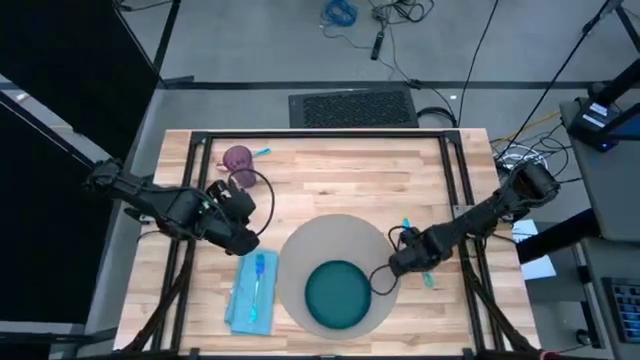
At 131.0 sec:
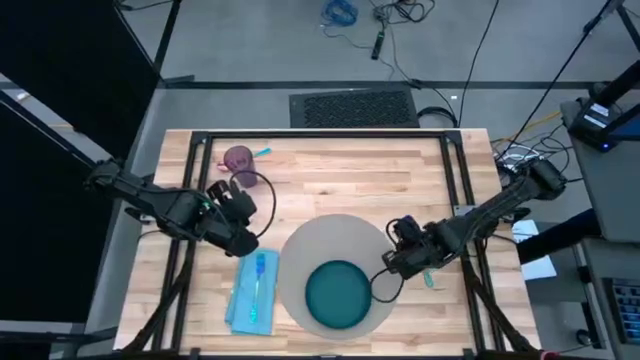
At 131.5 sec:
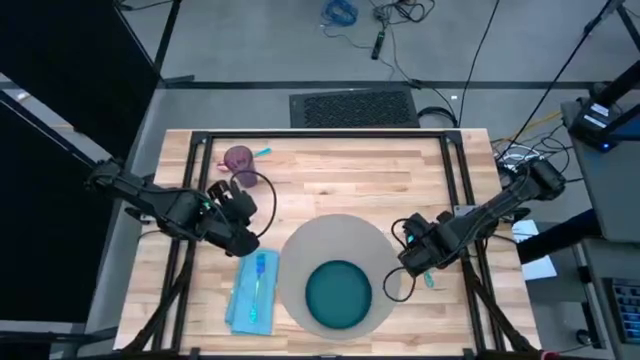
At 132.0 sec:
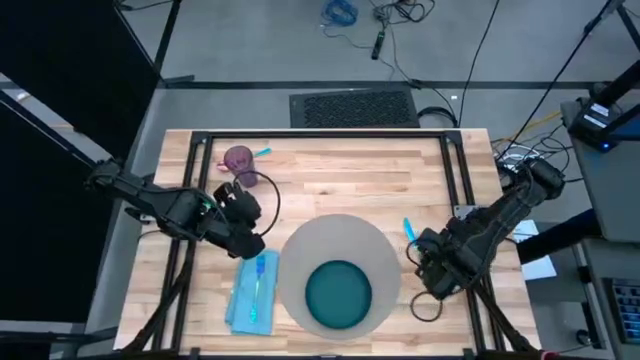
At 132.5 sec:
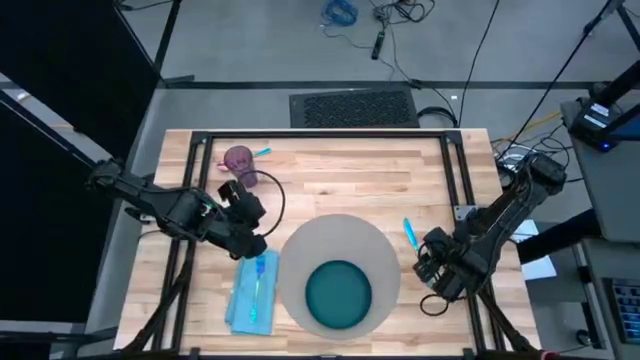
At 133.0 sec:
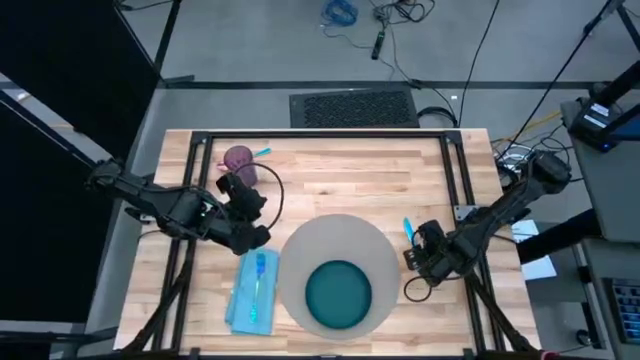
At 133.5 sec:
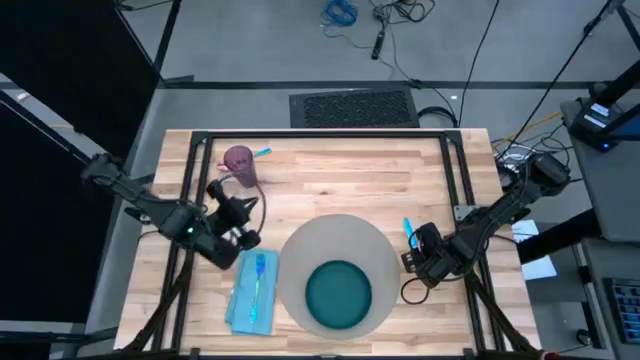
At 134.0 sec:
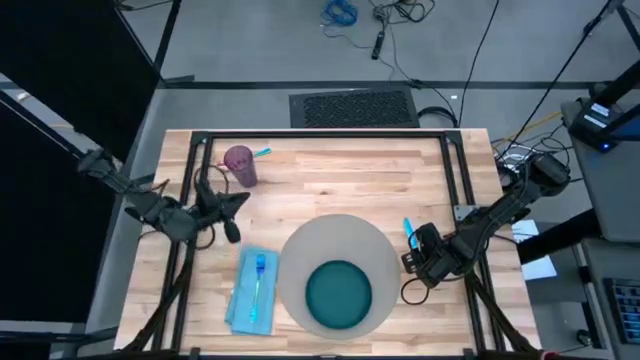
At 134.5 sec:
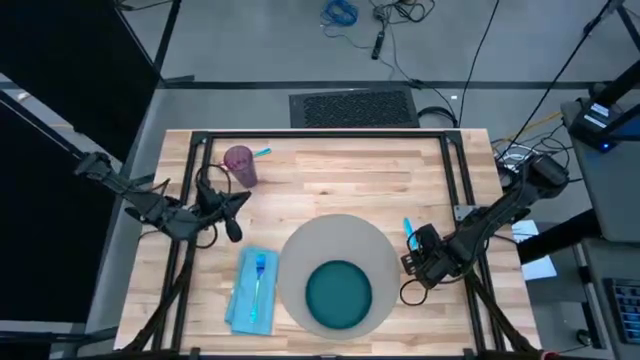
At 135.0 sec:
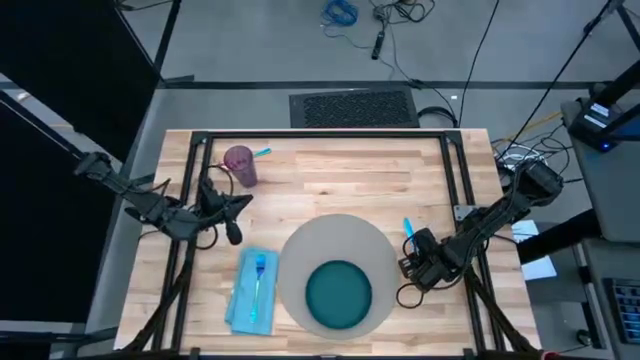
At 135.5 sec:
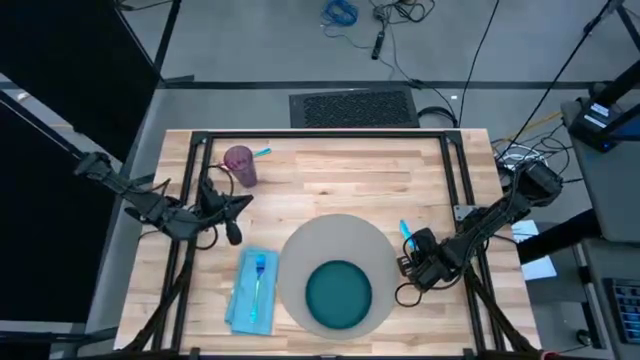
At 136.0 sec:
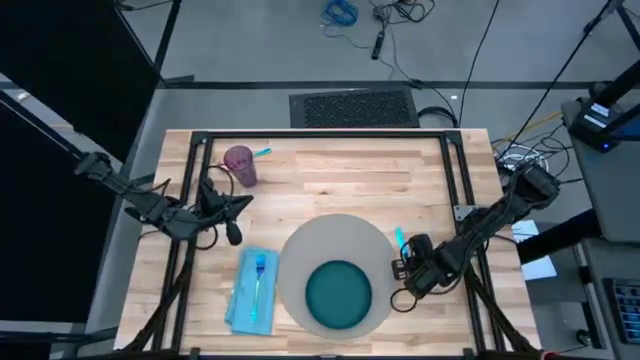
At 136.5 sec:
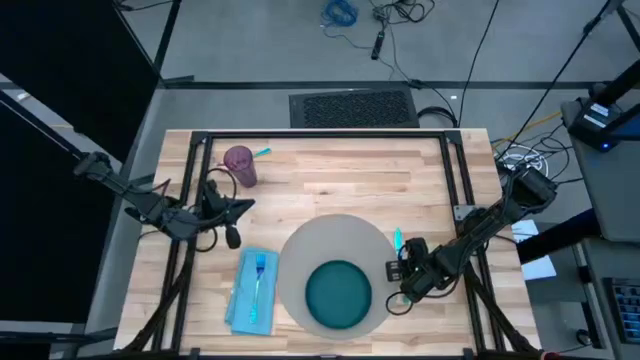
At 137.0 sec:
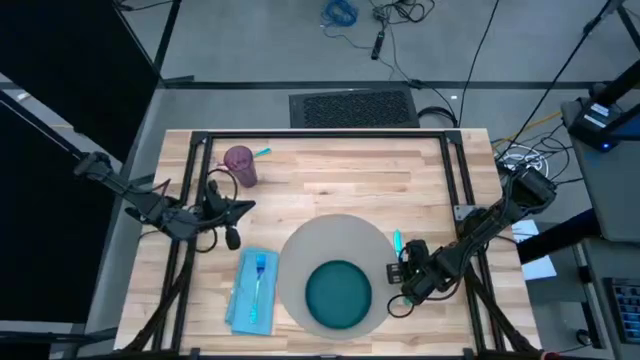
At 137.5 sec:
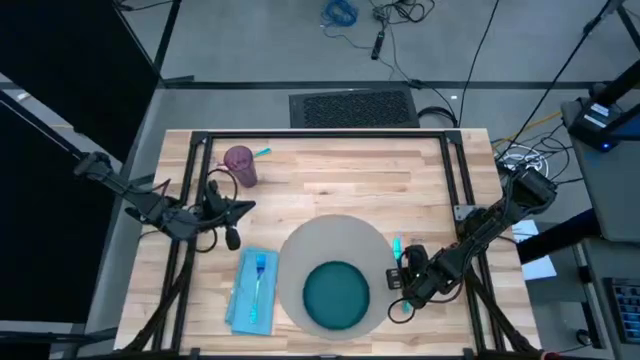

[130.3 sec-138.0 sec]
Task: Set table place
Move the blue knife from the top of the gray mat

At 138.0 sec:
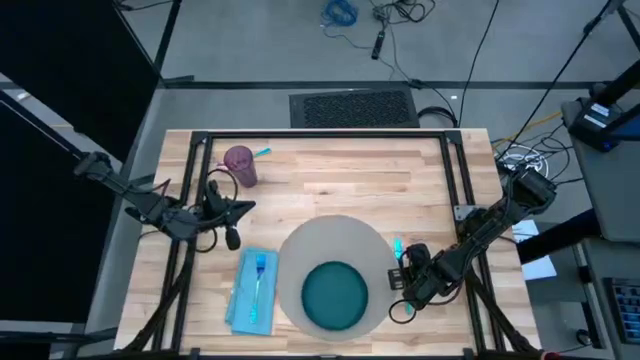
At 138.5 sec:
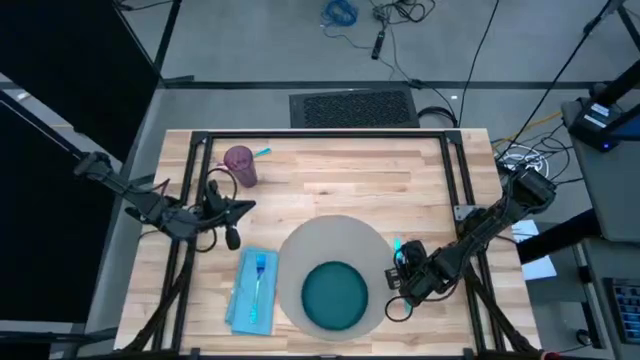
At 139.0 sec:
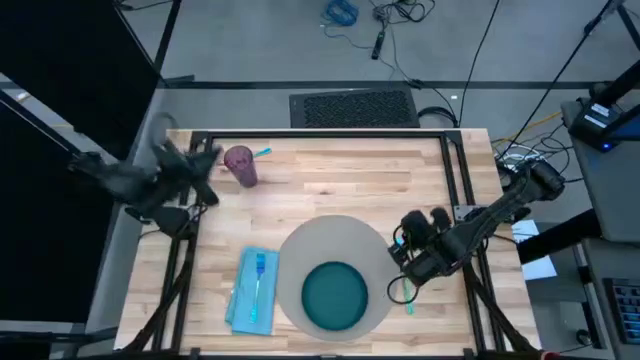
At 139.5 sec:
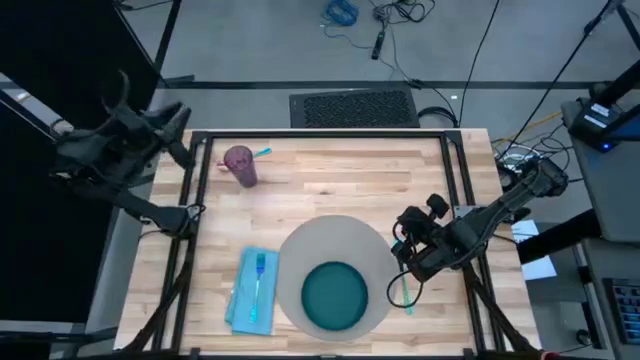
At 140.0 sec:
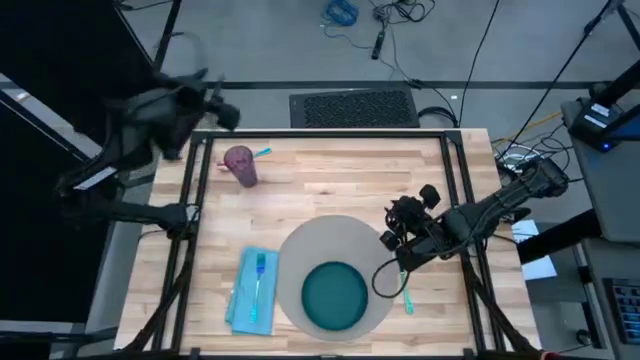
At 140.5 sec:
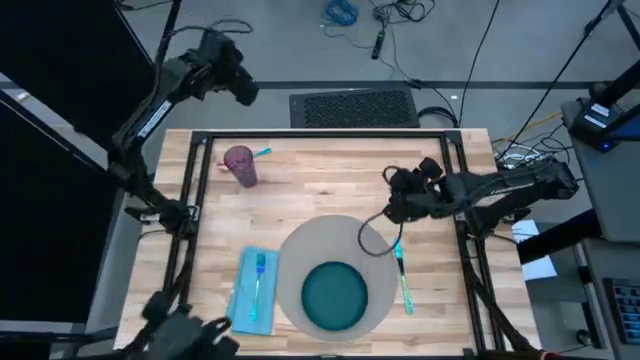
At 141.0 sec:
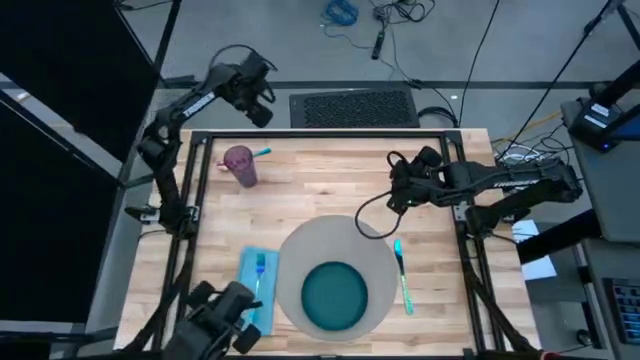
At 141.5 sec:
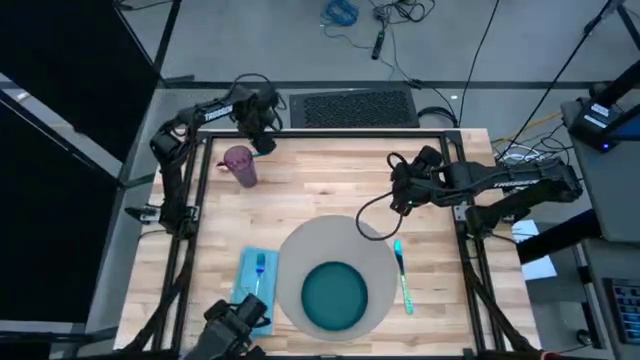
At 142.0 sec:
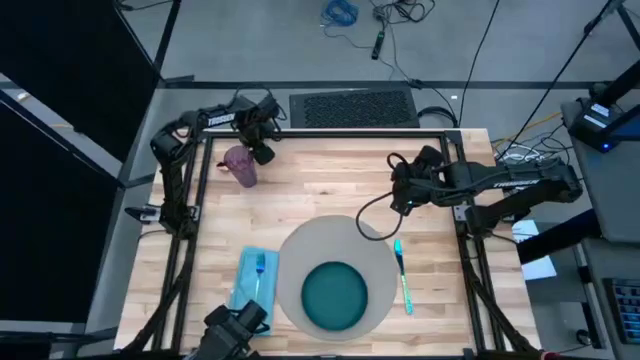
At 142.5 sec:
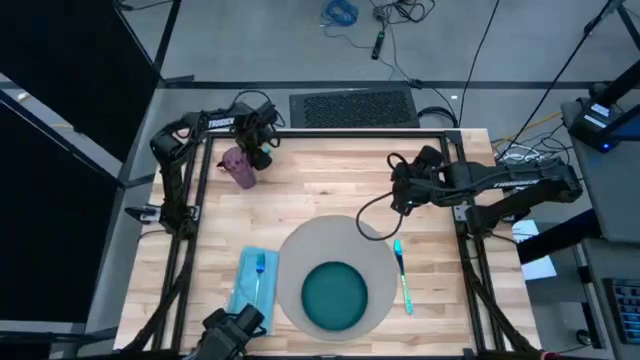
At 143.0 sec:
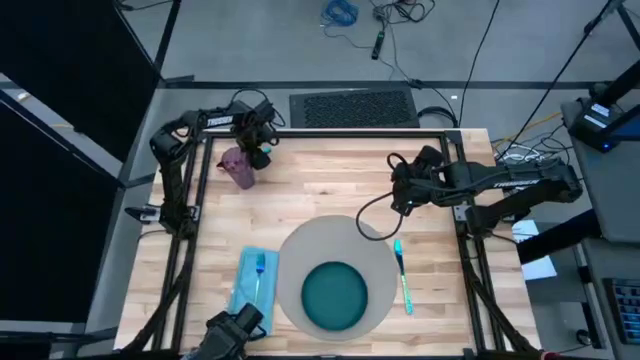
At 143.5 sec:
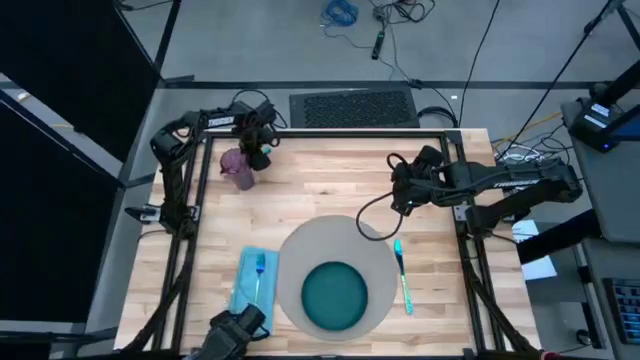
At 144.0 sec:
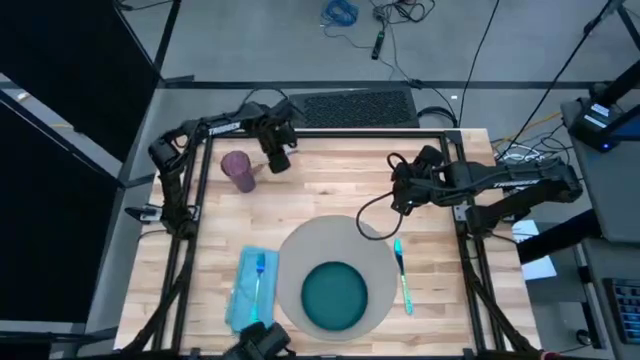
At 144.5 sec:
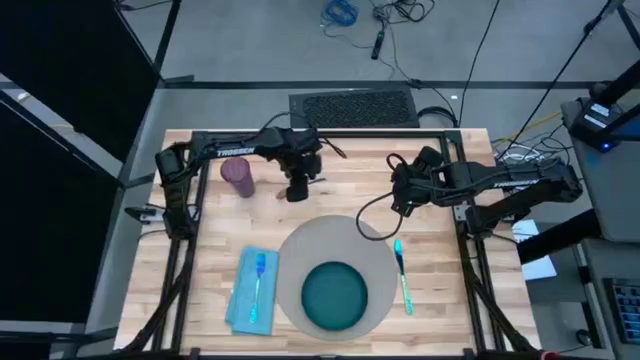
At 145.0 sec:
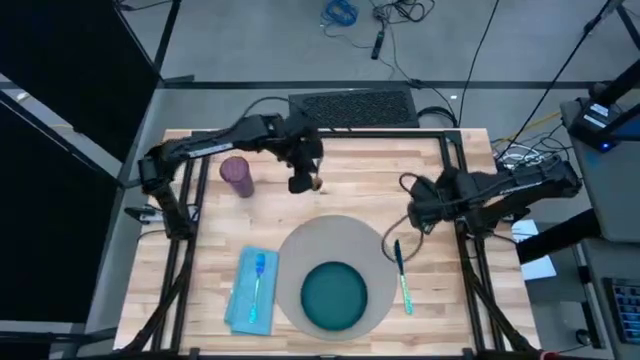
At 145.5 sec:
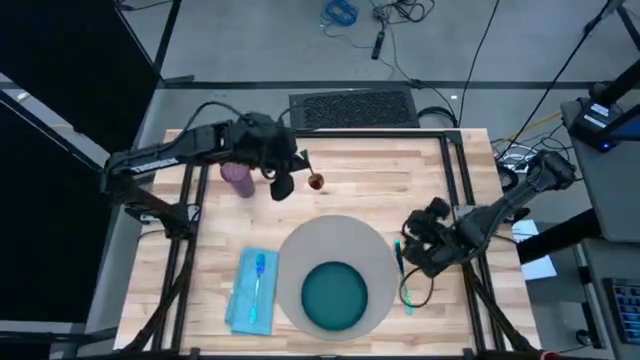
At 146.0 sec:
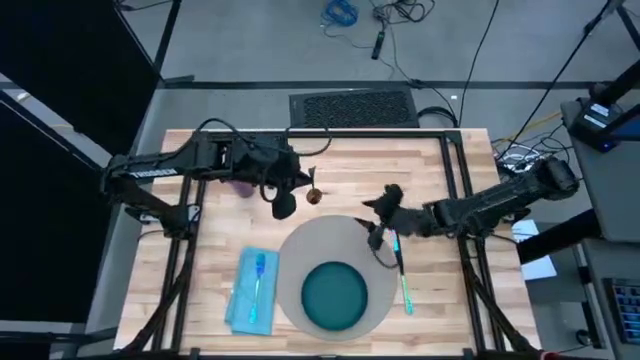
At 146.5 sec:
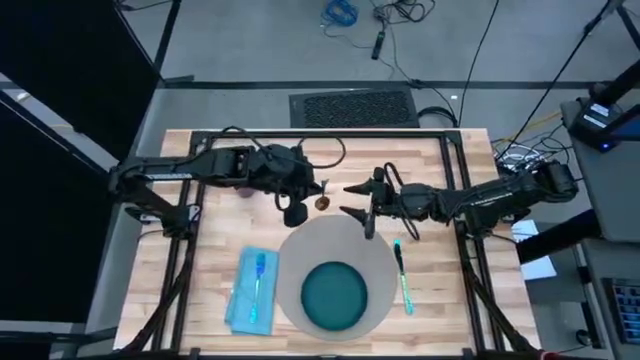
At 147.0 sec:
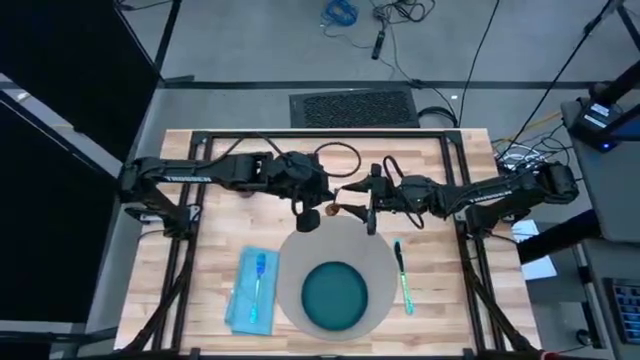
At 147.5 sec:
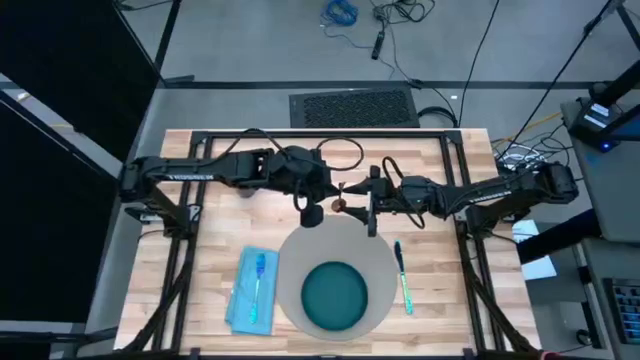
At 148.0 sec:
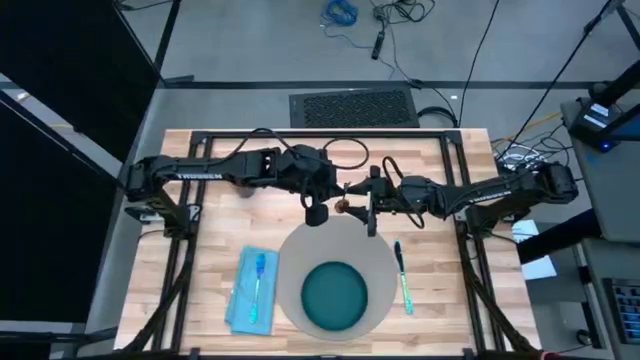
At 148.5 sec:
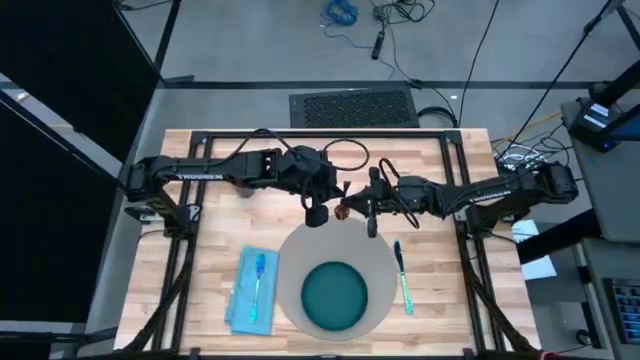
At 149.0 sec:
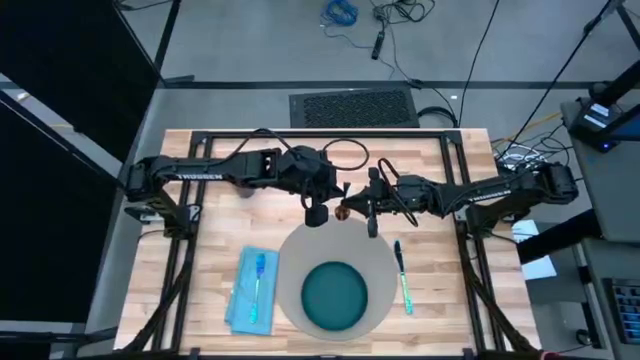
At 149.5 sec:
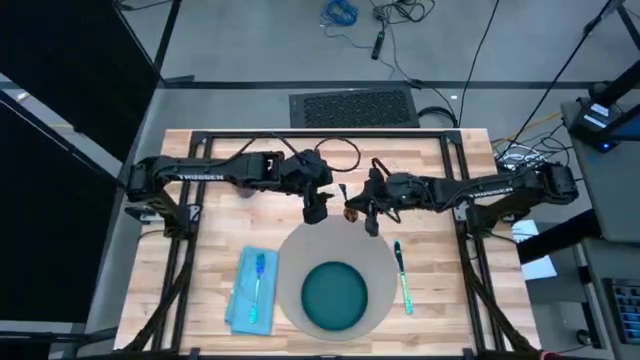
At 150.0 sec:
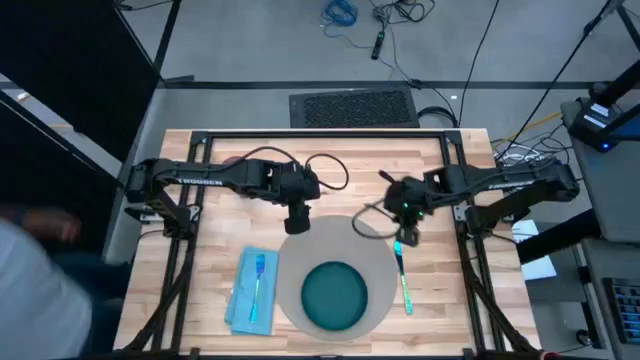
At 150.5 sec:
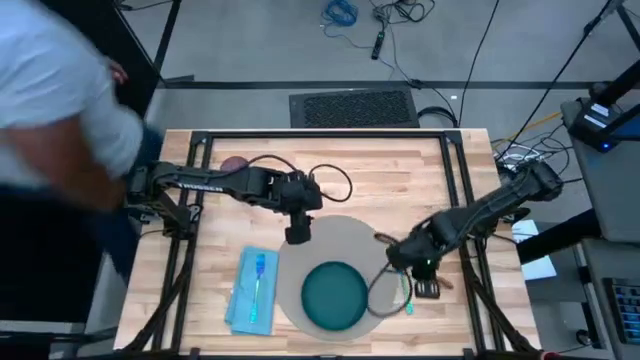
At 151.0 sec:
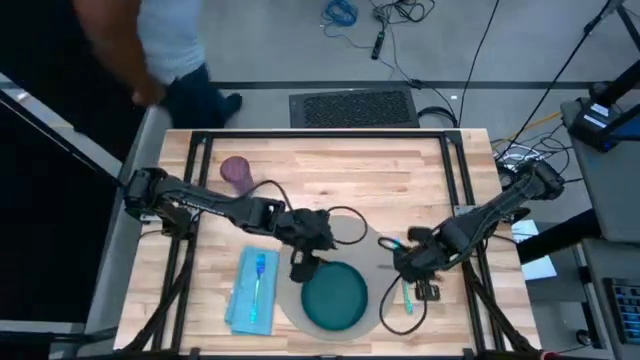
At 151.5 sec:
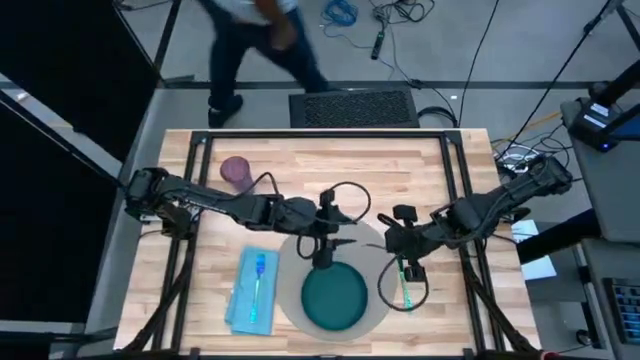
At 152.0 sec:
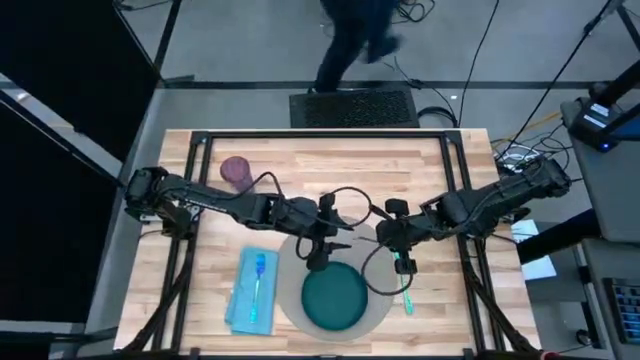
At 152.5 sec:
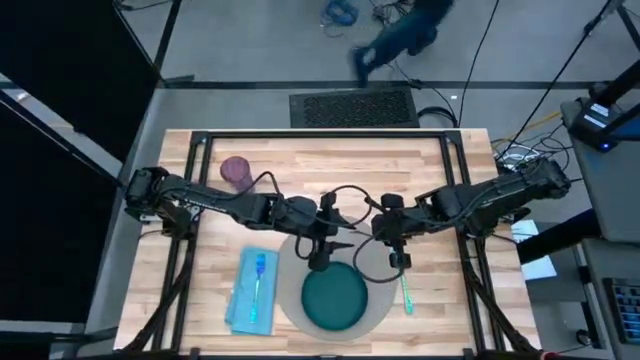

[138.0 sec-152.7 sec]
Put the blue spoon beside the blue knife on the table
